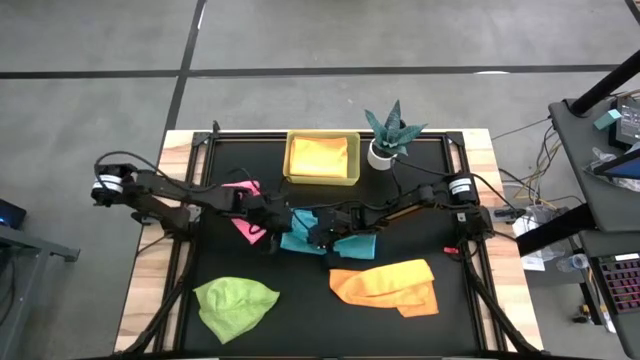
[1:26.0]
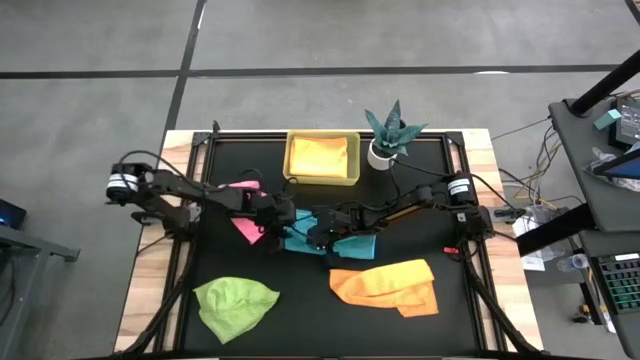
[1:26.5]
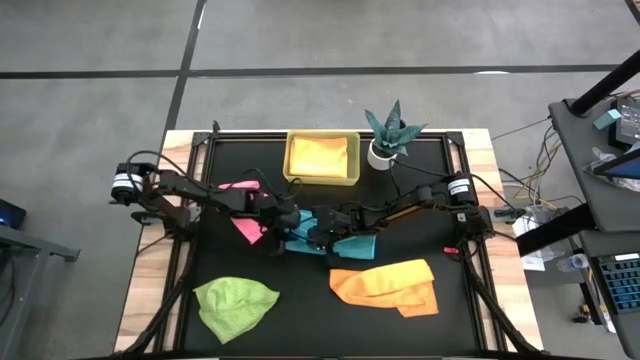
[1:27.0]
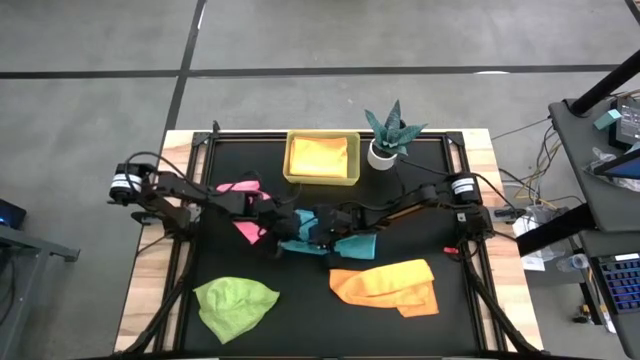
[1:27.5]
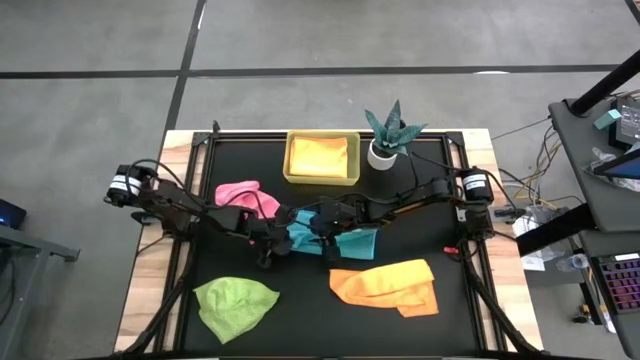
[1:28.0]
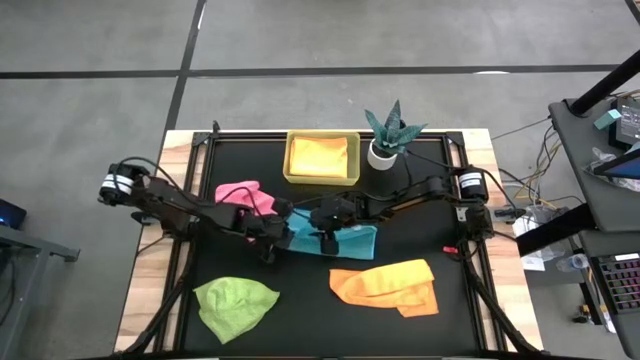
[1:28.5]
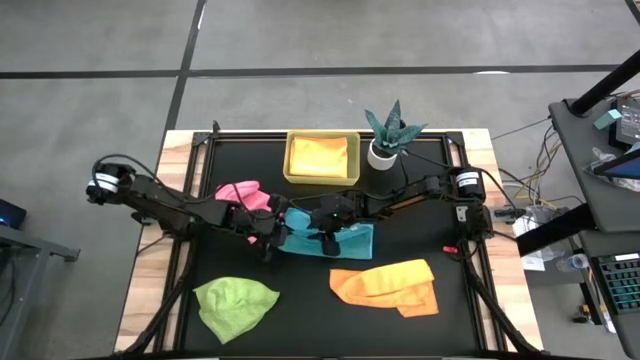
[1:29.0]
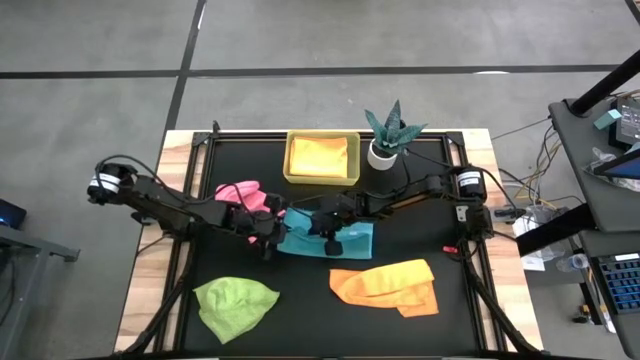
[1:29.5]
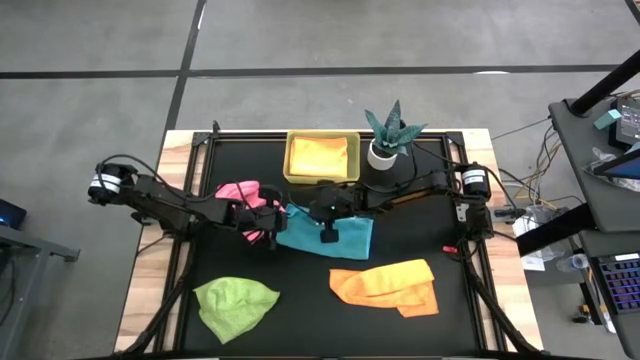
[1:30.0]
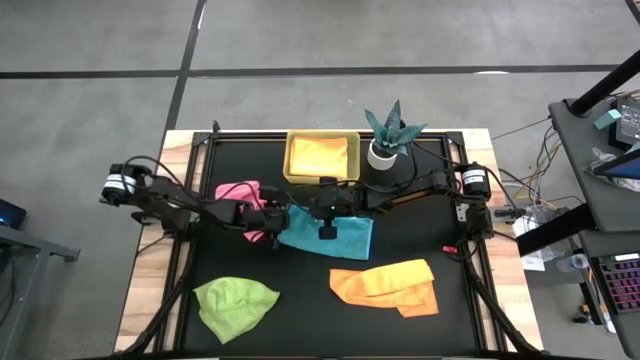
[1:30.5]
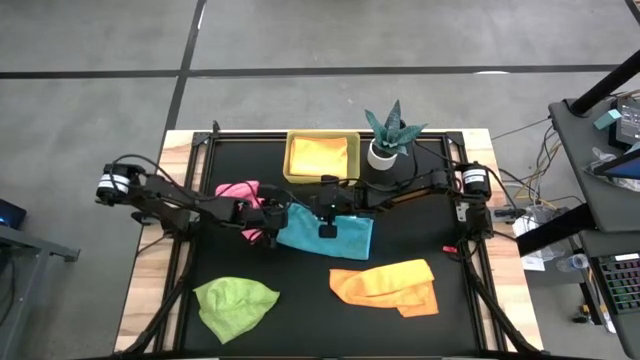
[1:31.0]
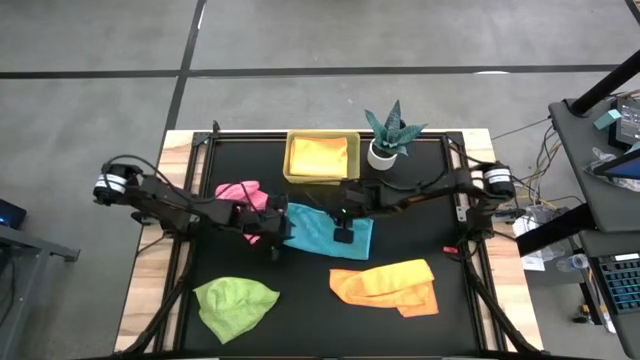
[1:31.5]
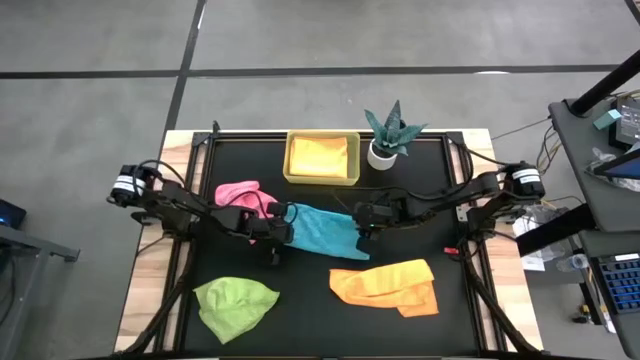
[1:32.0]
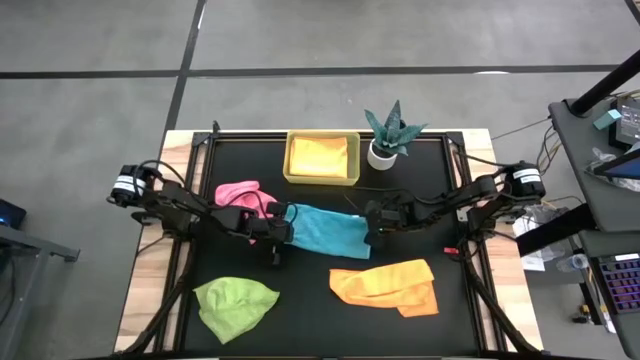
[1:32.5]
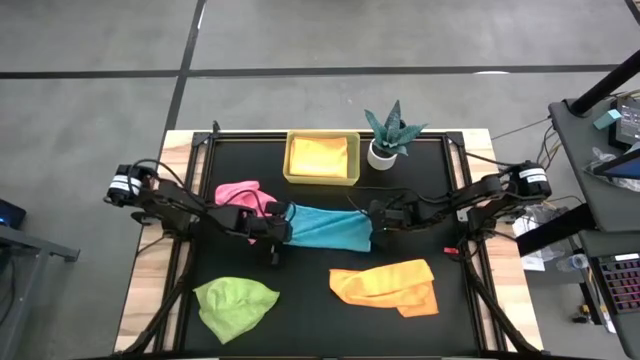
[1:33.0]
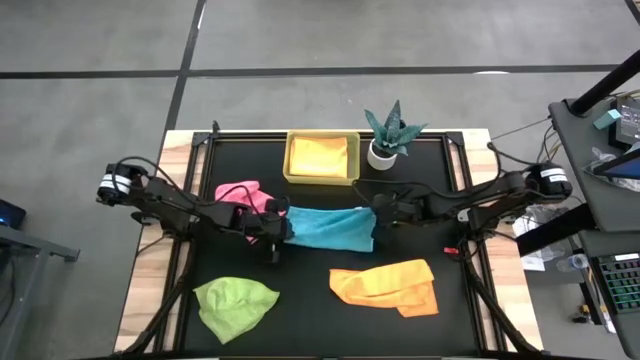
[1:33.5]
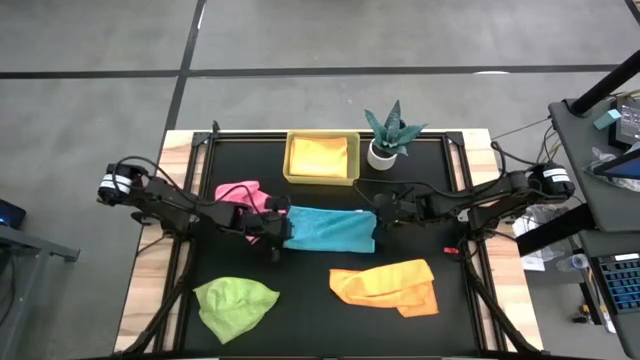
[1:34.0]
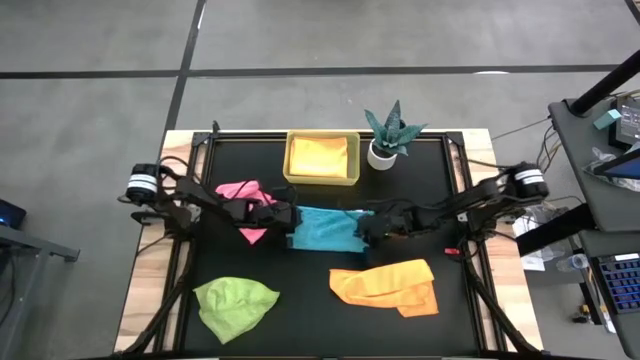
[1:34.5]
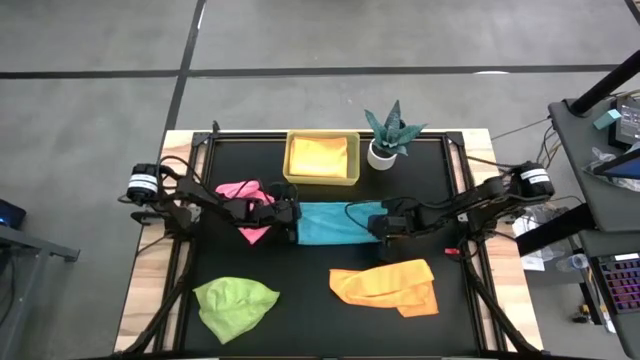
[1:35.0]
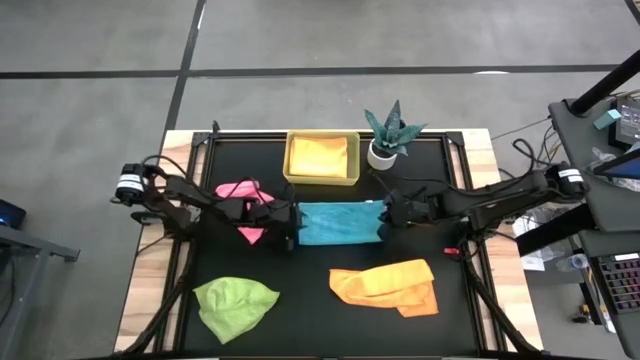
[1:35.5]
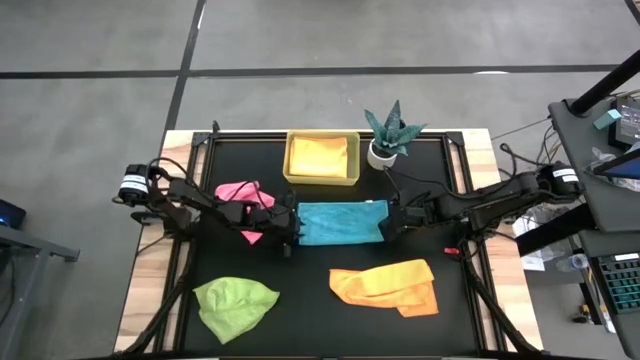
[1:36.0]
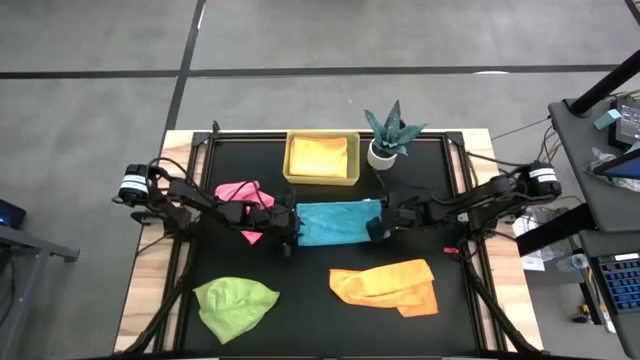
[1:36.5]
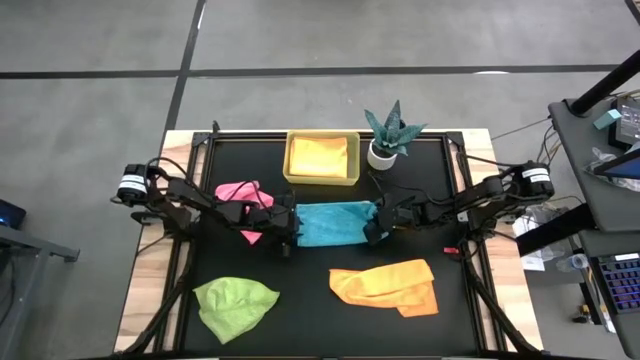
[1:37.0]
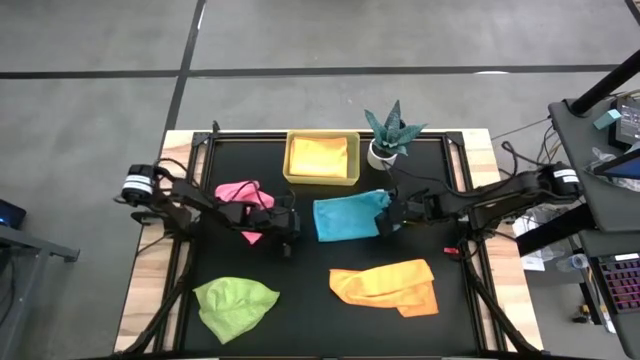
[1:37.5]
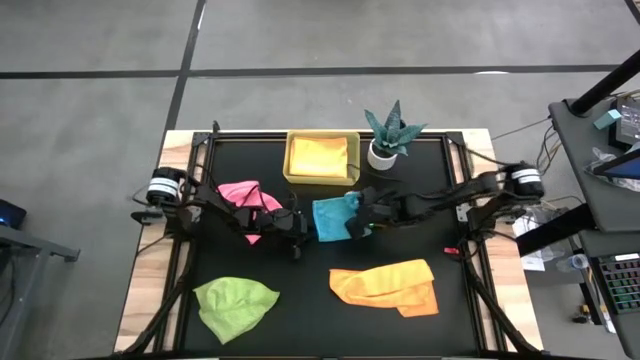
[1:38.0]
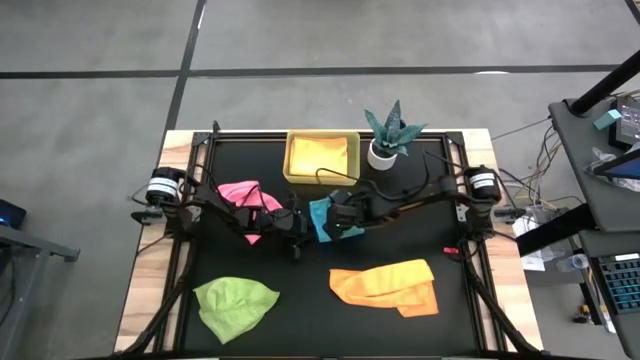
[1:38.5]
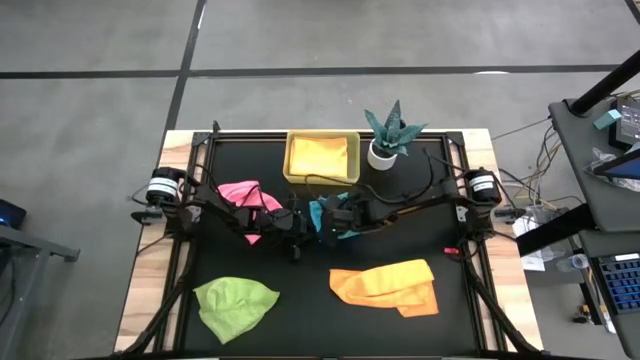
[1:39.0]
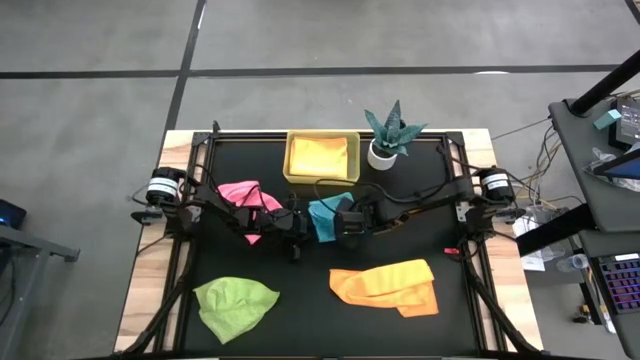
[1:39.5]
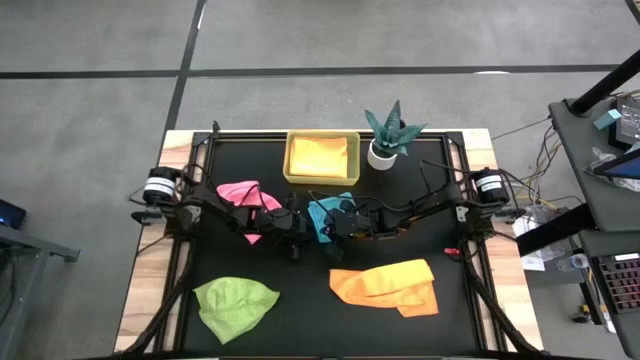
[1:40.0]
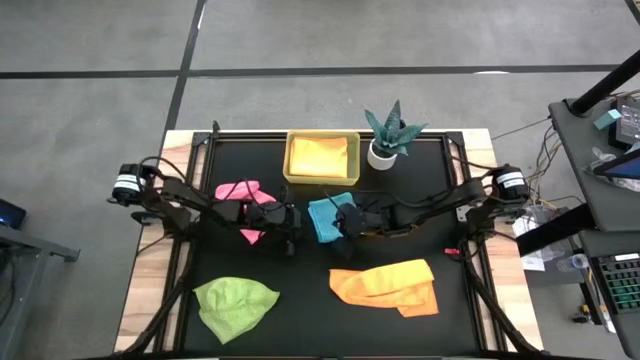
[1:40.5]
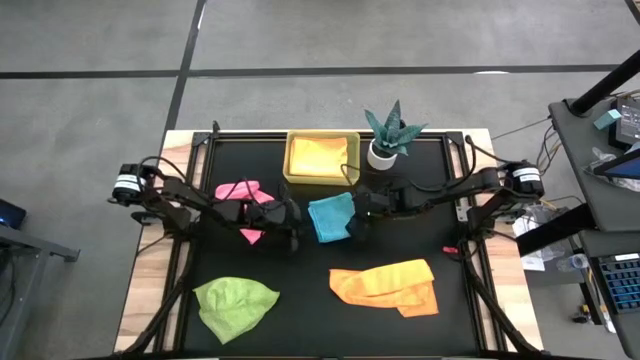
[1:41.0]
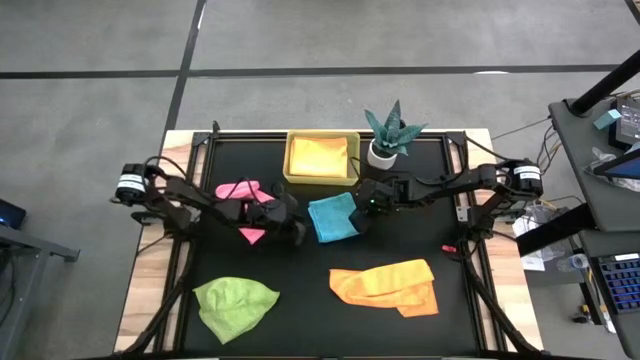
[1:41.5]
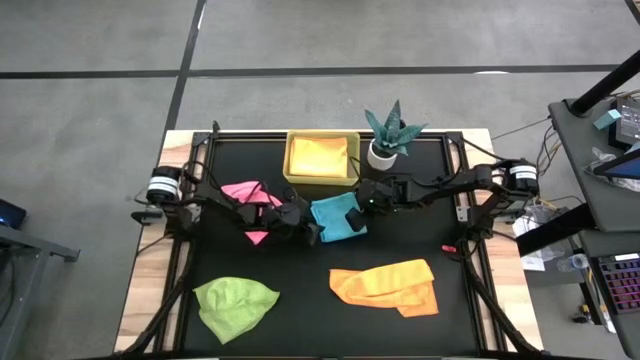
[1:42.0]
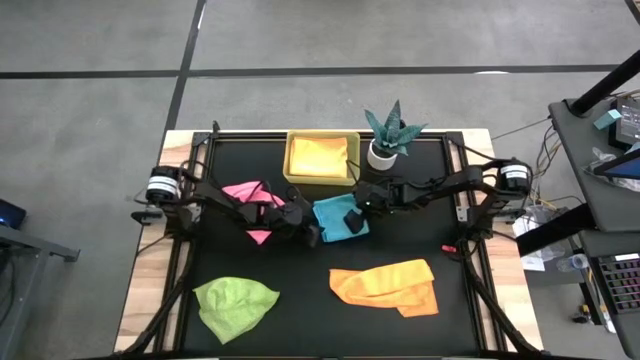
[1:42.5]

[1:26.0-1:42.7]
Task: Fold microfiber towels
Fold the blue microfiber cloth

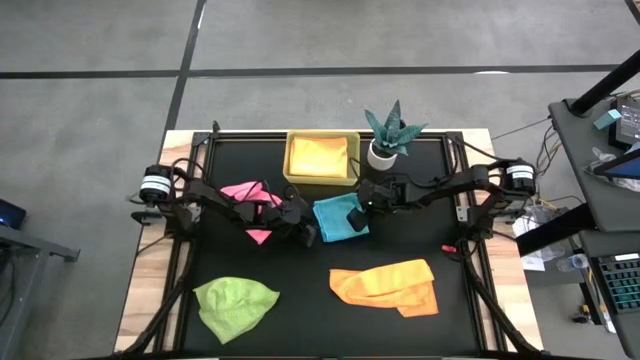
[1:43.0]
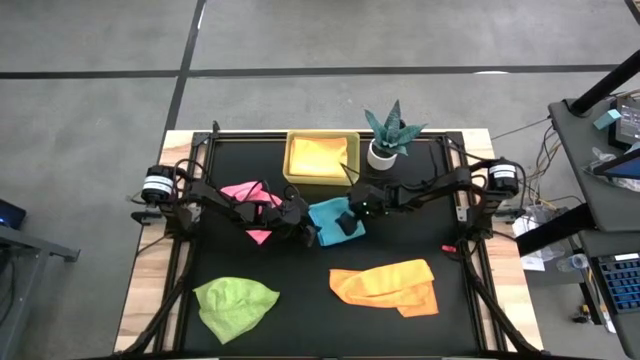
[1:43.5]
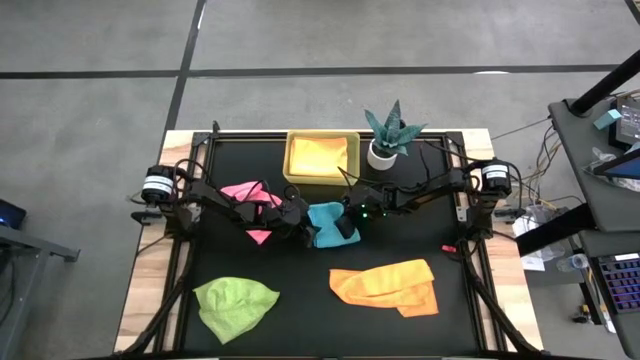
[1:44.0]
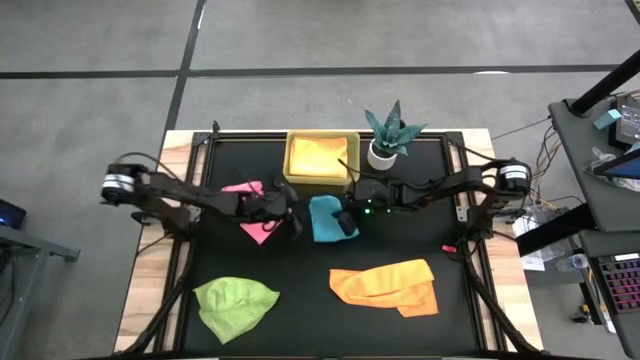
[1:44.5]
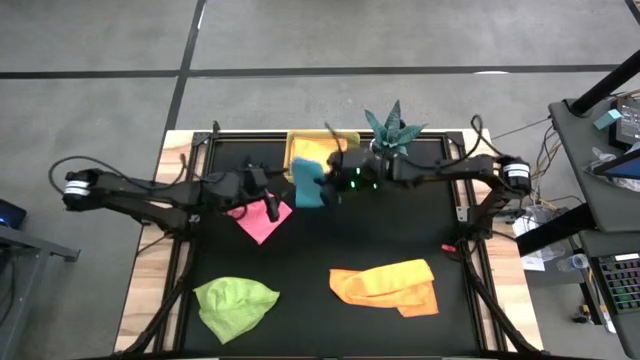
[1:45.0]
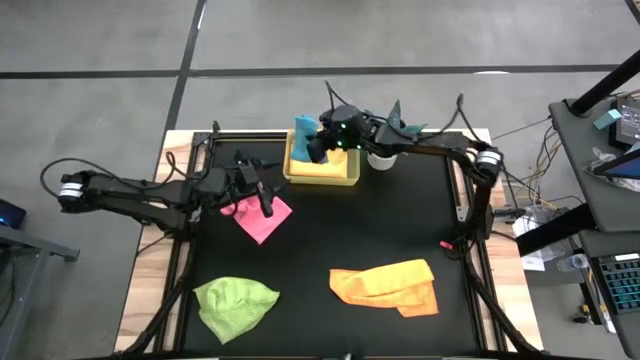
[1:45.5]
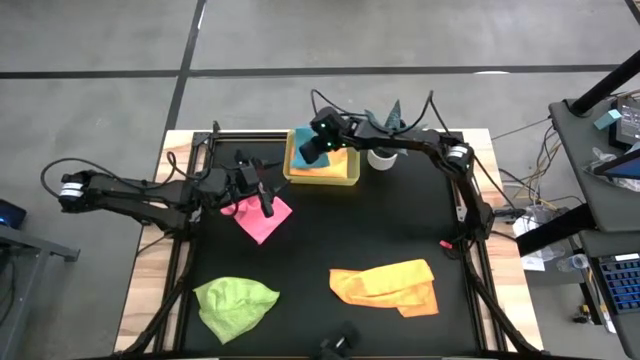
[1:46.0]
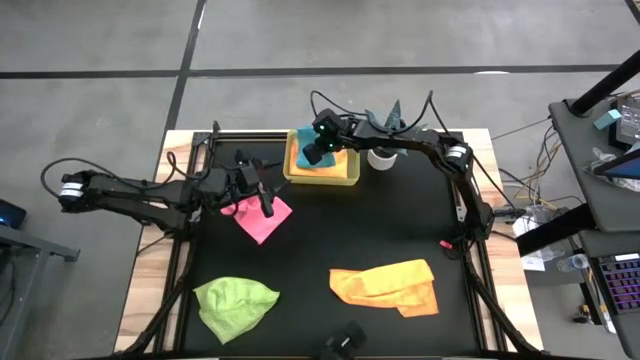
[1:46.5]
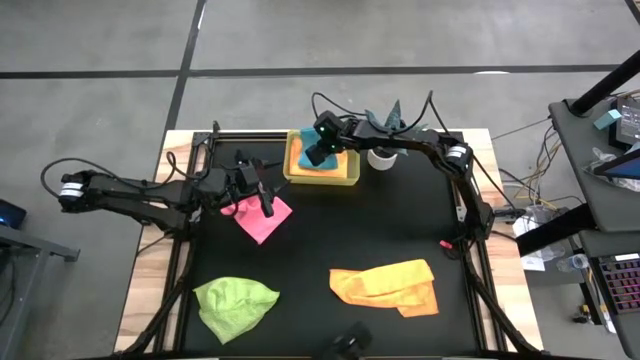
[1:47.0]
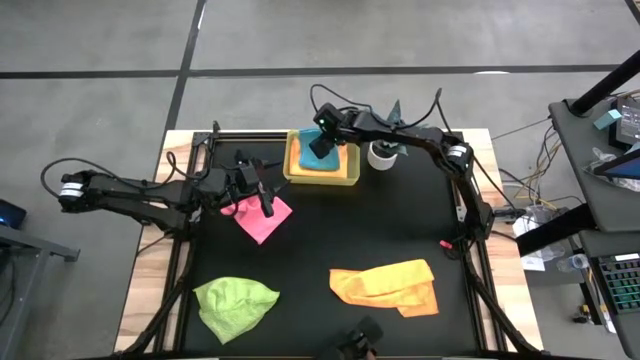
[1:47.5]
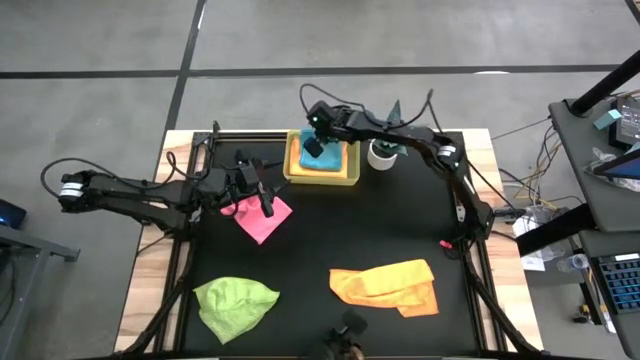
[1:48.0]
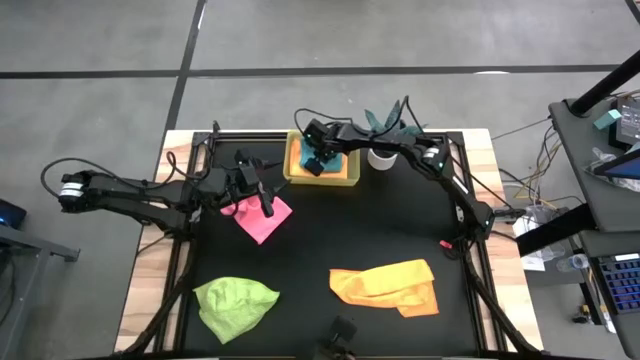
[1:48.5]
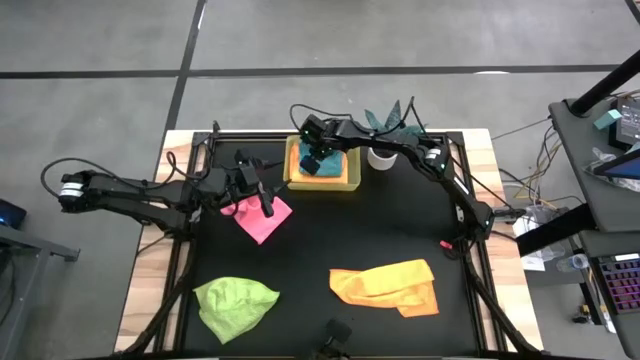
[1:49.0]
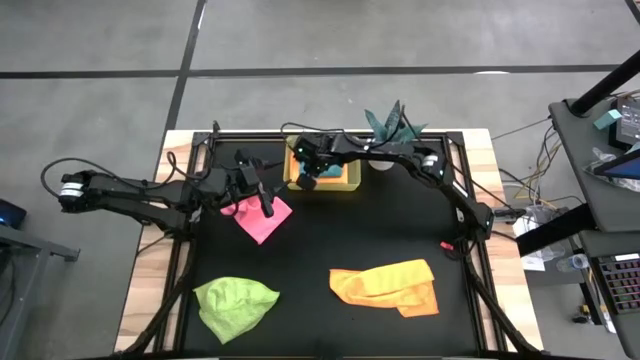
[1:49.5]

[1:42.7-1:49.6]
Put the blue microfiber cloth into the yellow bin
